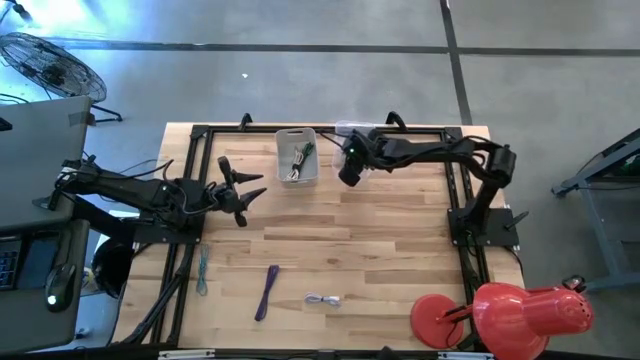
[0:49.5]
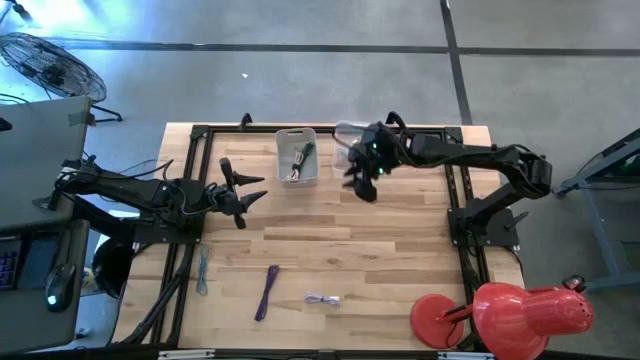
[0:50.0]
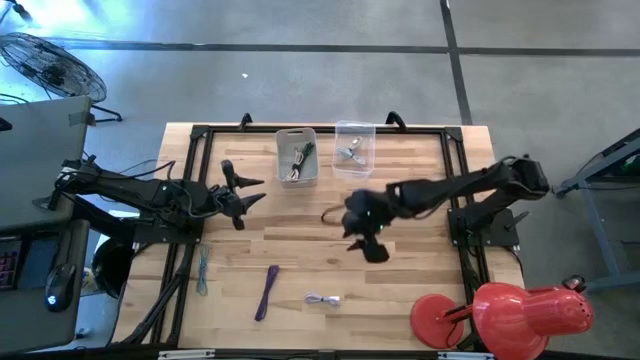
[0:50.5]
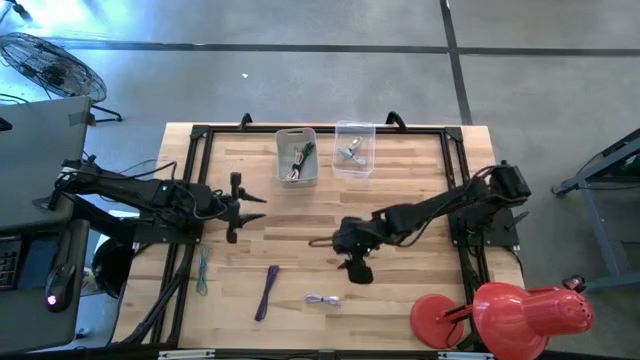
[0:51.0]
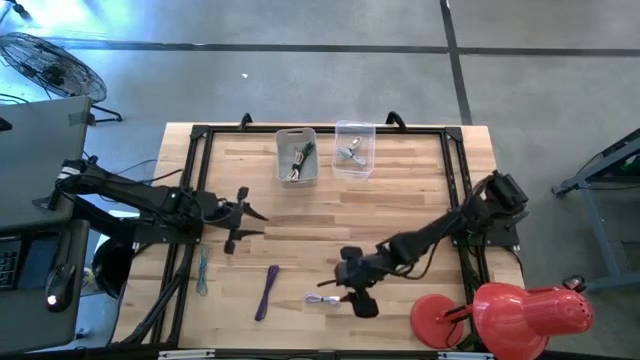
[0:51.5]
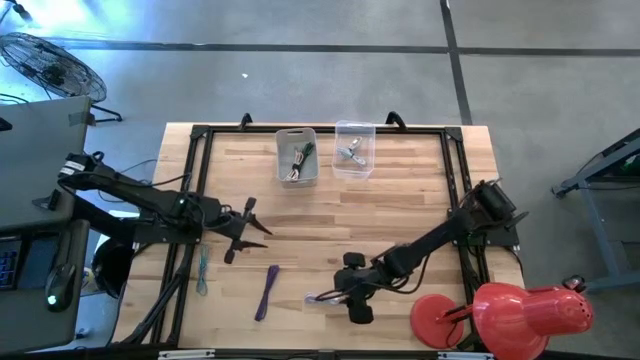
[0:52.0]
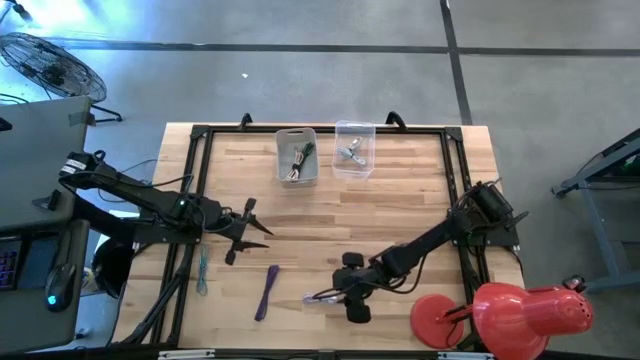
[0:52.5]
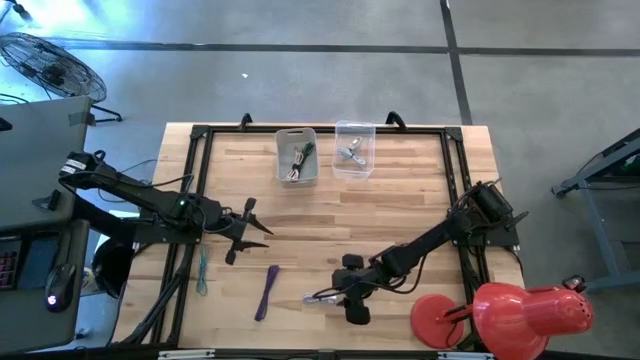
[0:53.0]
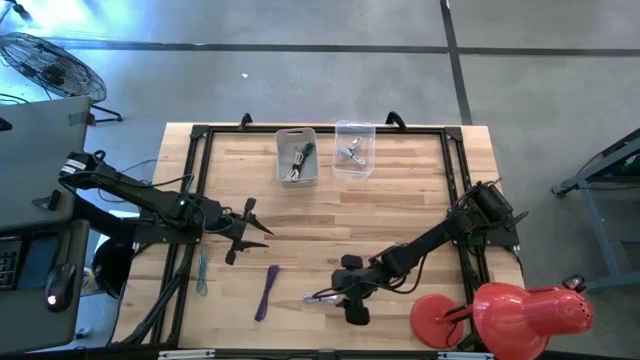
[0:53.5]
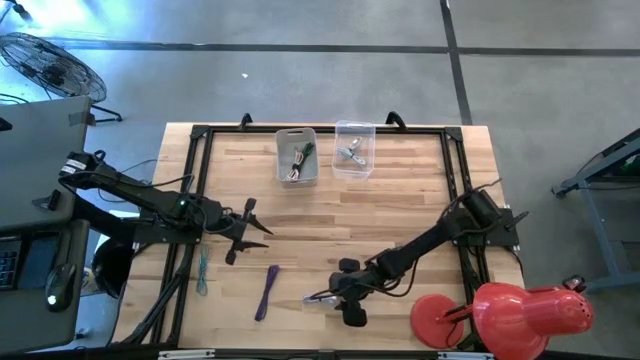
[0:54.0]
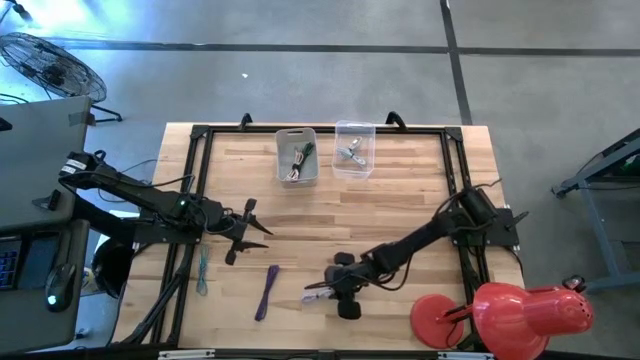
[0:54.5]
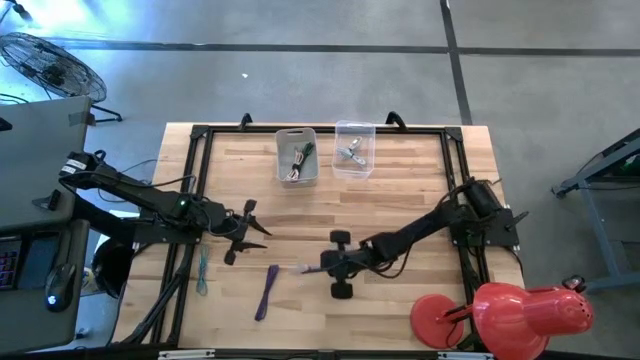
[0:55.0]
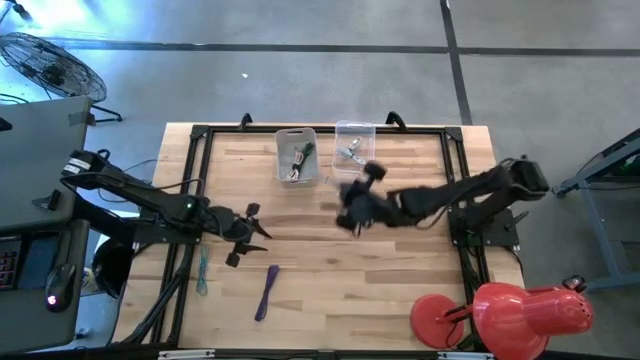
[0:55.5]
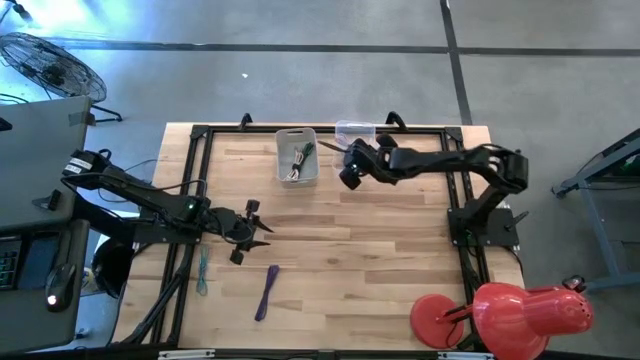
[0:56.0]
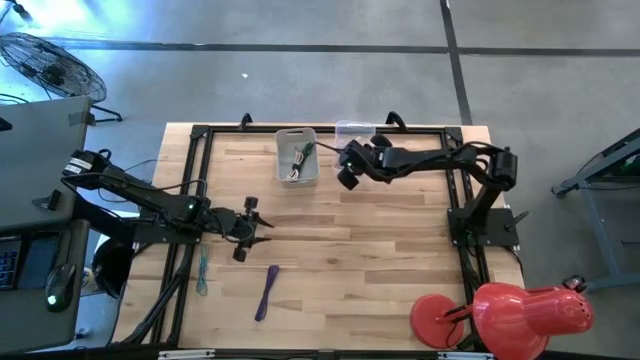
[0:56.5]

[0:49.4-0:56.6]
Task: Pick & Place USB Port
Put the purple charger cable into the transparent bin

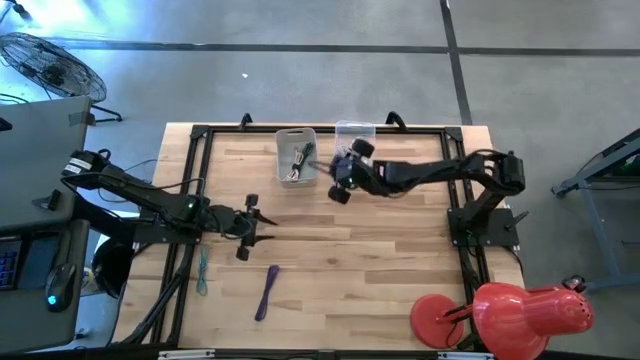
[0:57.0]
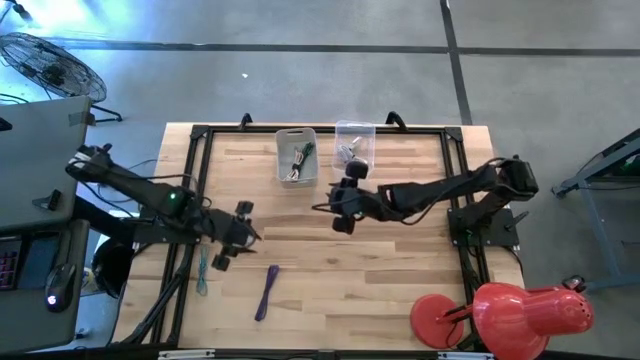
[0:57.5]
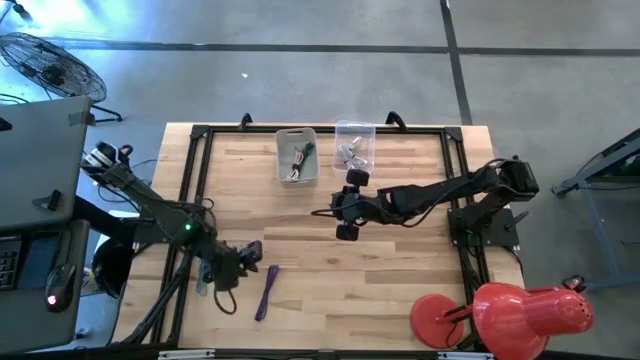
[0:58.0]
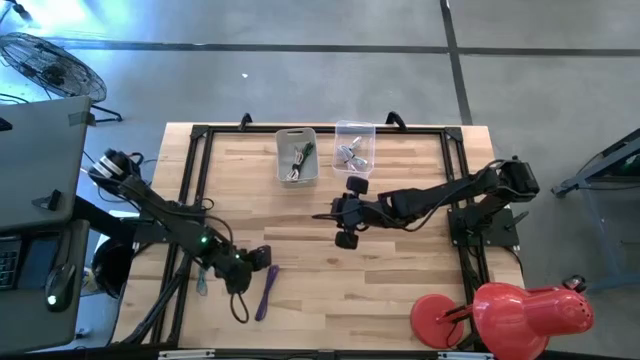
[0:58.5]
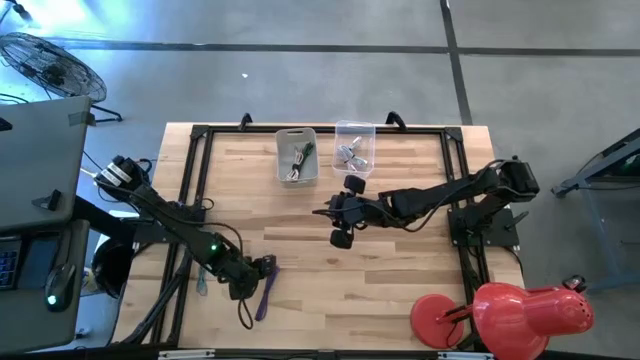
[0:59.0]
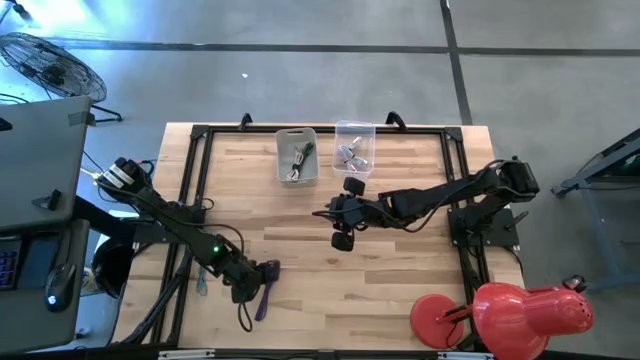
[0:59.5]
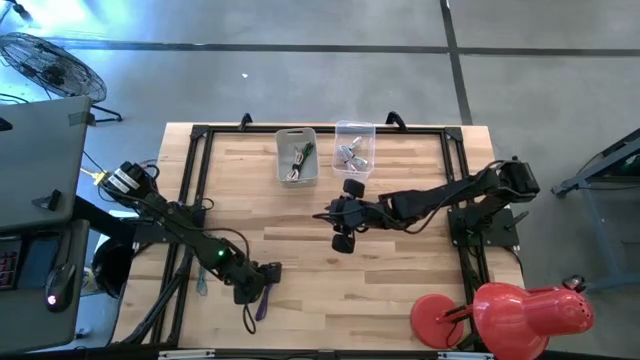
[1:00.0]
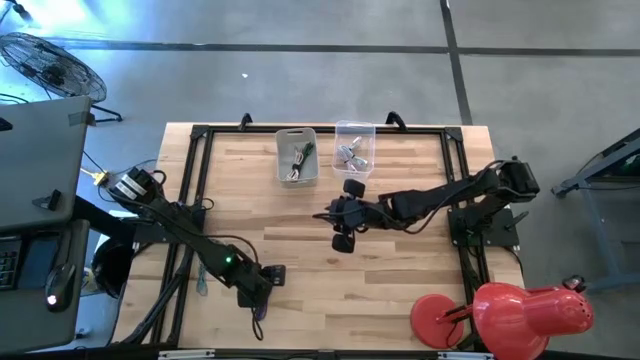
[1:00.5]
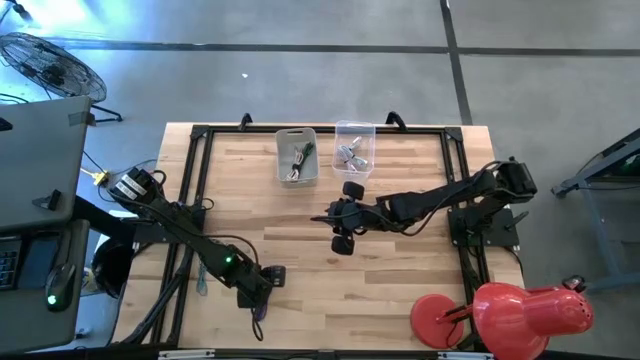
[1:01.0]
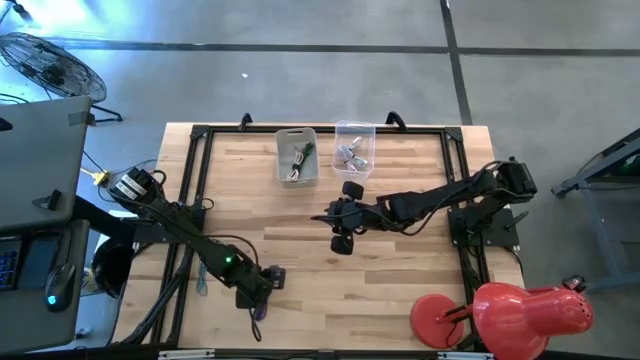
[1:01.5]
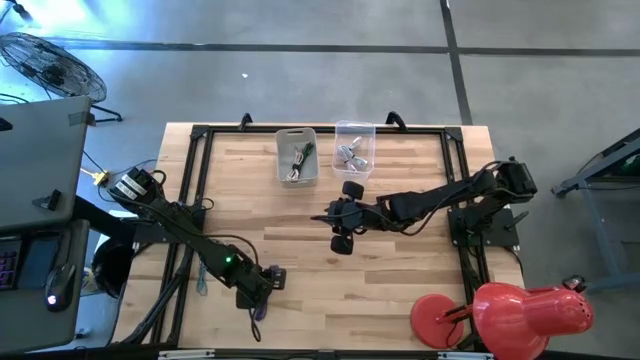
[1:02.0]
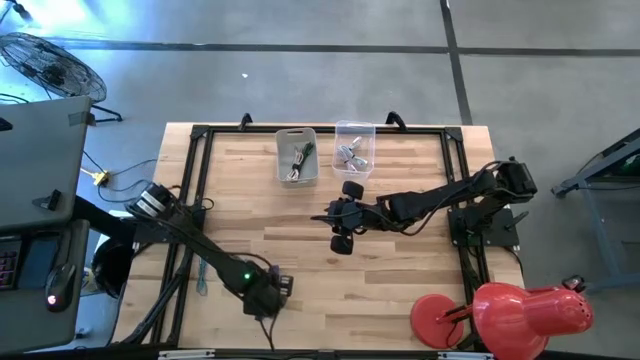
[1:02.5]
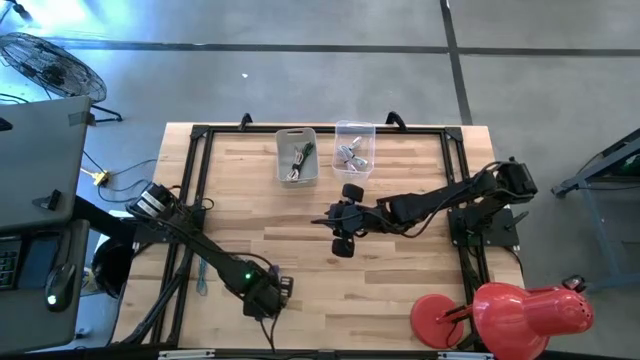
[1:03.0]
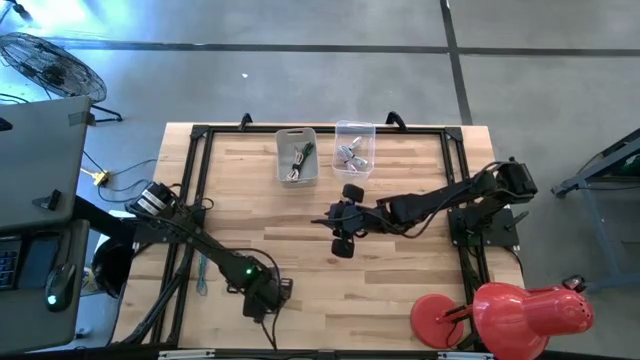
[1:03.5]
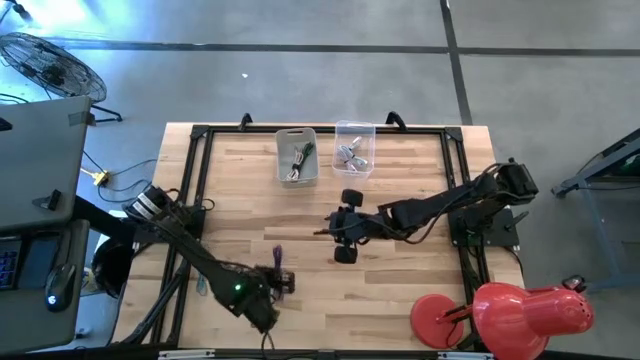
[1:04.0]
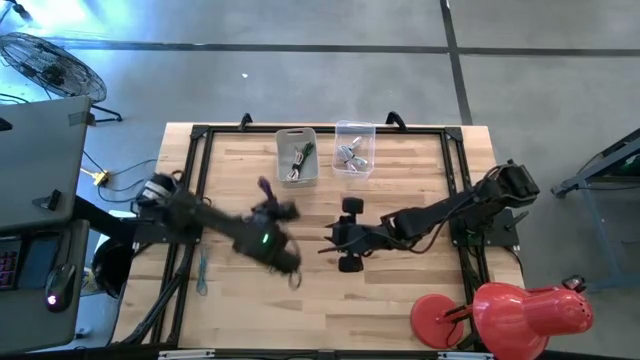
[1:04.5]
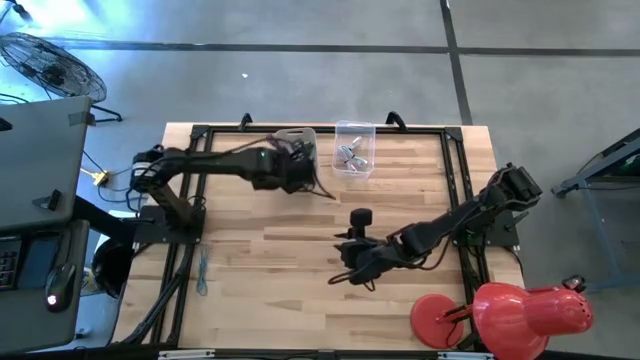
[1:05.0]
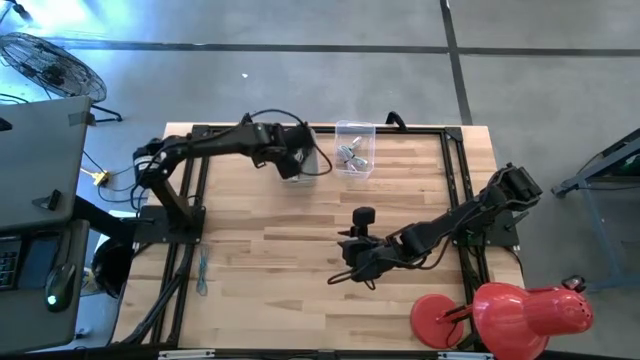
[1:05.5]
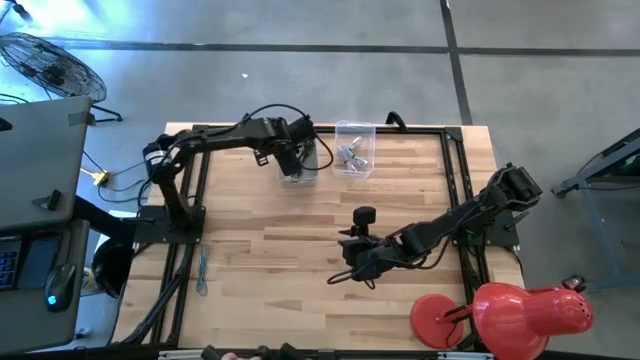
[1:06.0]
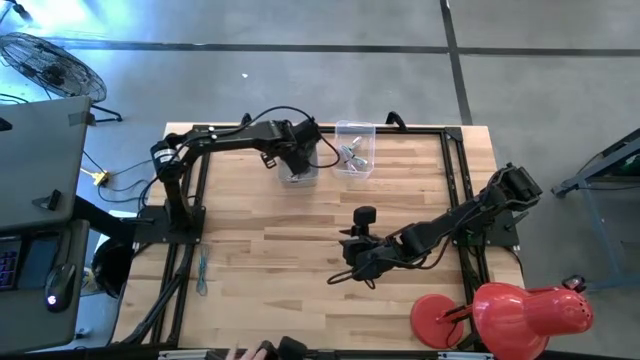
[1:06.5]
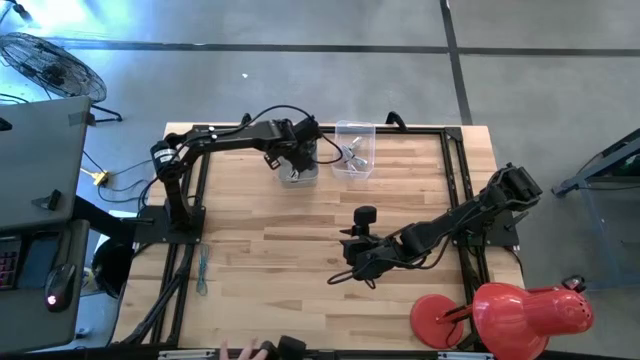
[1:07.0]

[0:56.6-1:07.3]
Put the dark blue charger cable into the grey bin

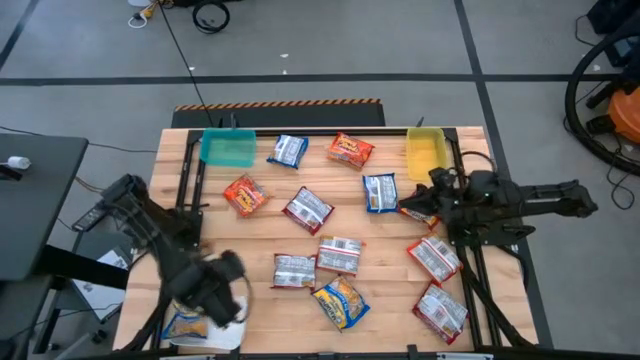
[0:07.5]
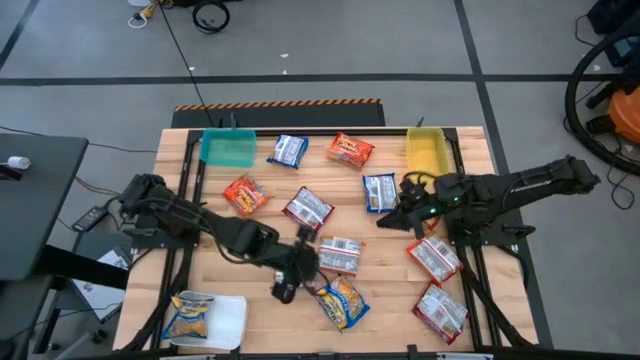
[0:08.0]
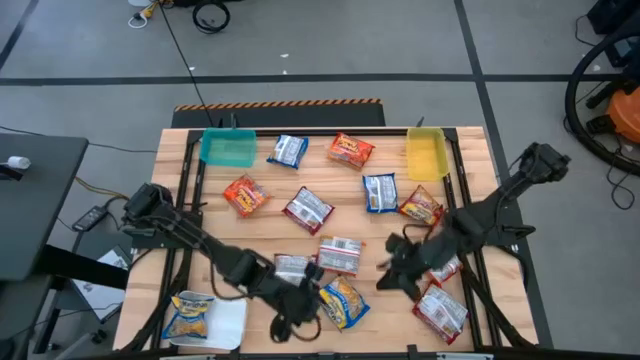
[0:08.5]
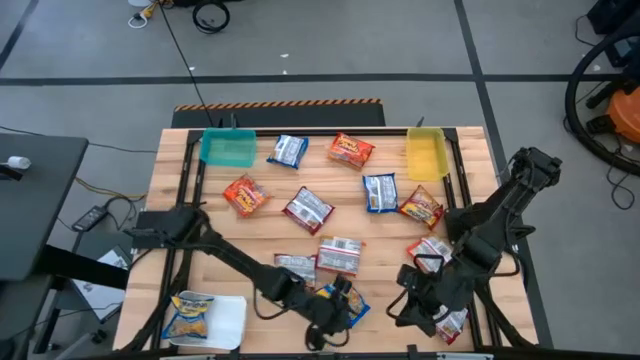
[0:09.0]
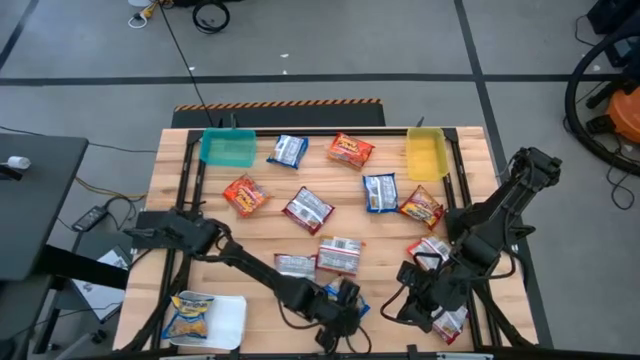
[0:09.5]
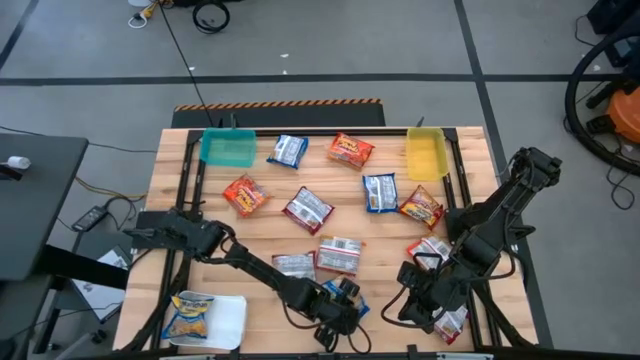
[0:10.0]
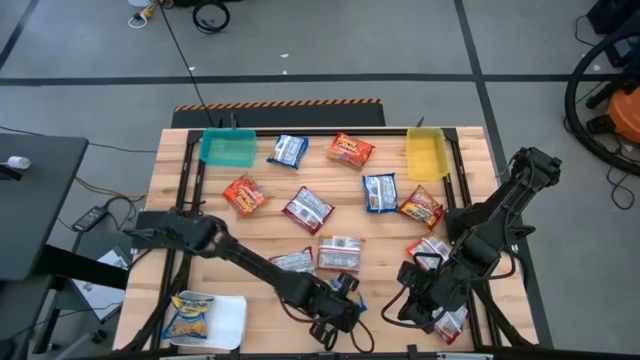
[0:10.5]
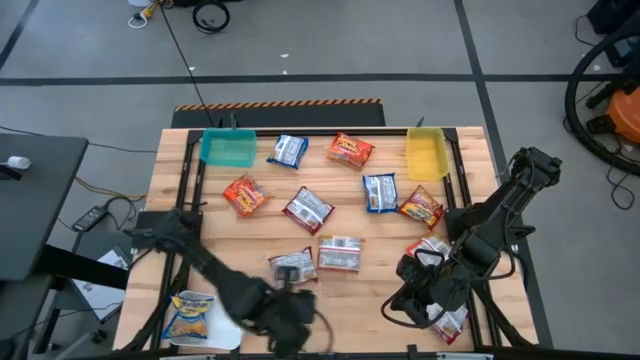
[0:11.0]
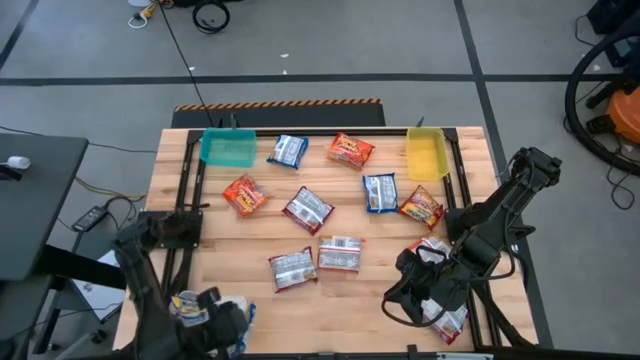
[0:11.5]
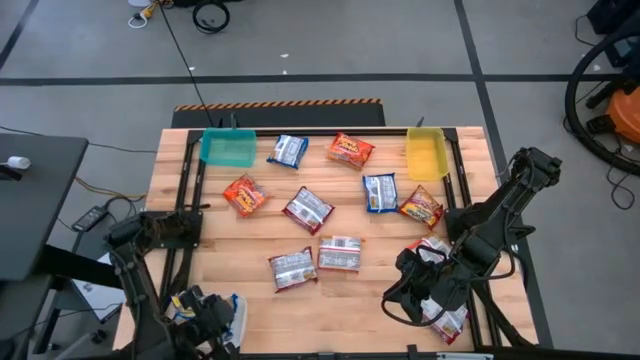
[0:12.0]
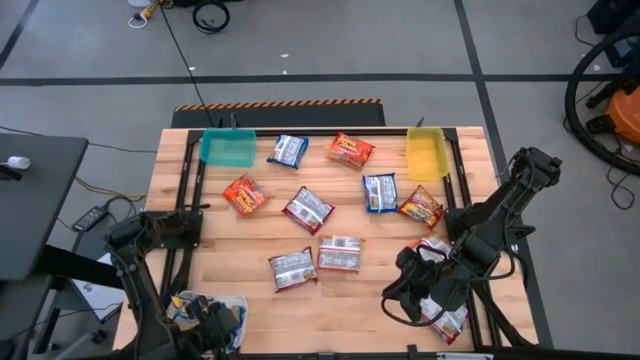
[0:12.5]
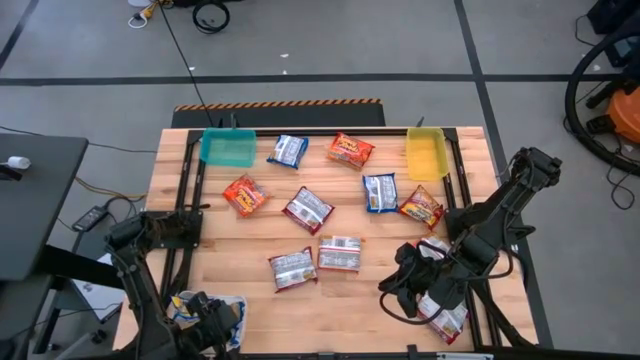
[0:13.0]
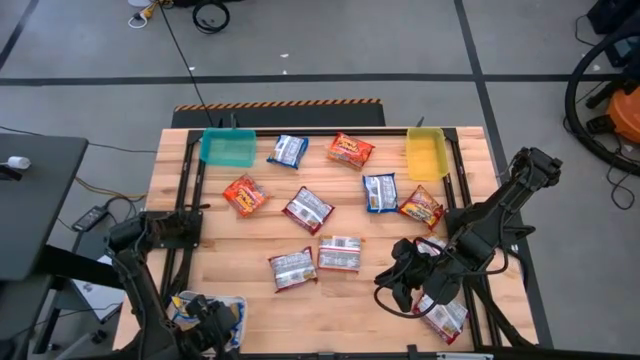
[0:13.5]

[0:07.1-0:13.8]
Task: Sort Maruchan noodles
Put the blue noodle pack into the white bin
